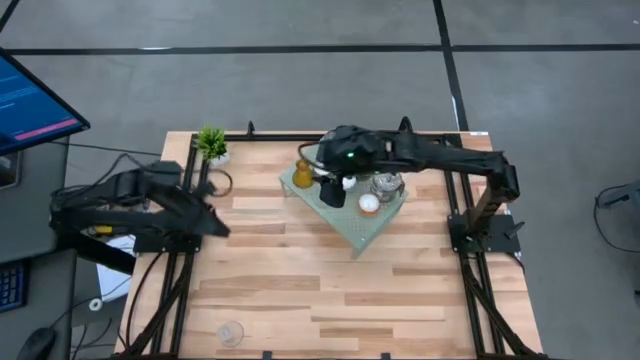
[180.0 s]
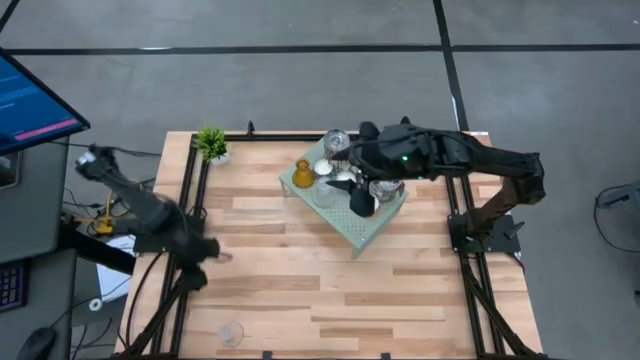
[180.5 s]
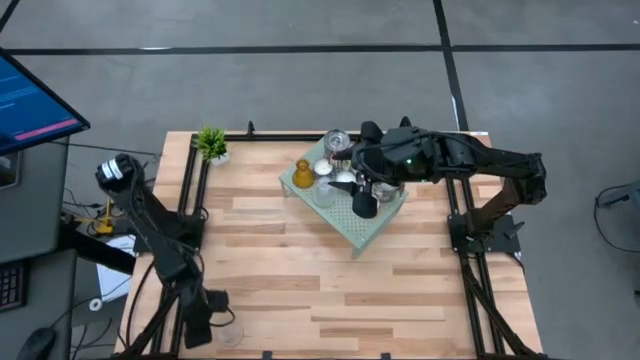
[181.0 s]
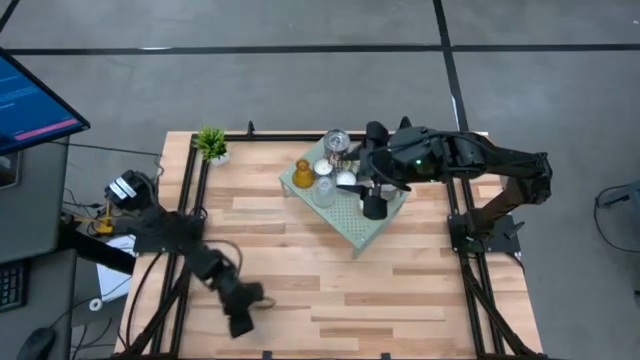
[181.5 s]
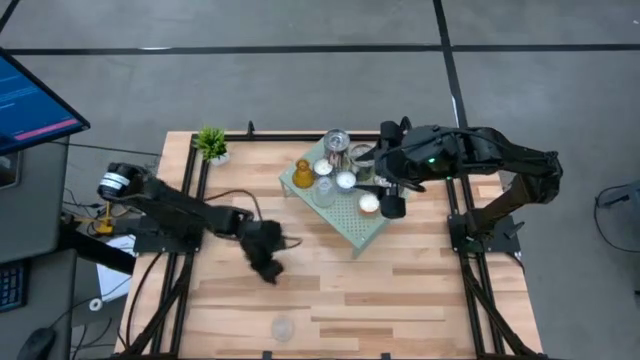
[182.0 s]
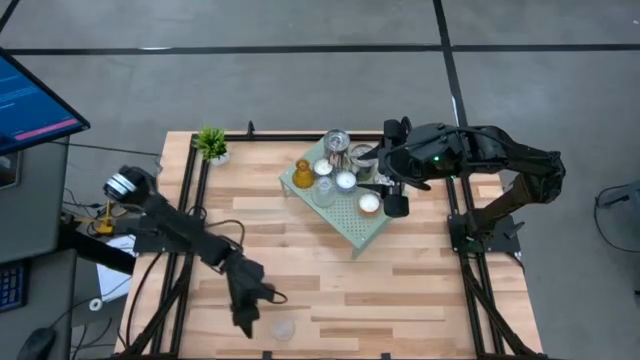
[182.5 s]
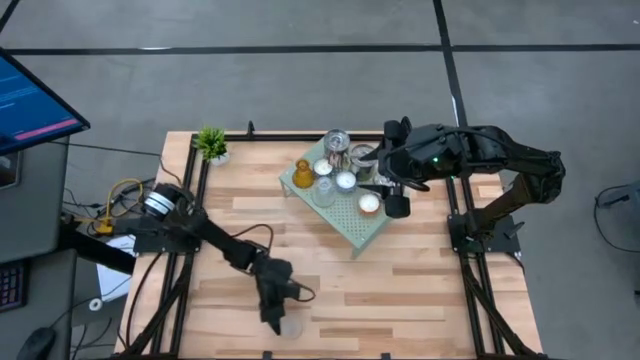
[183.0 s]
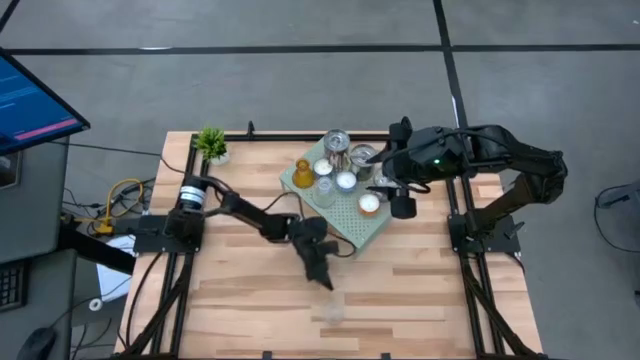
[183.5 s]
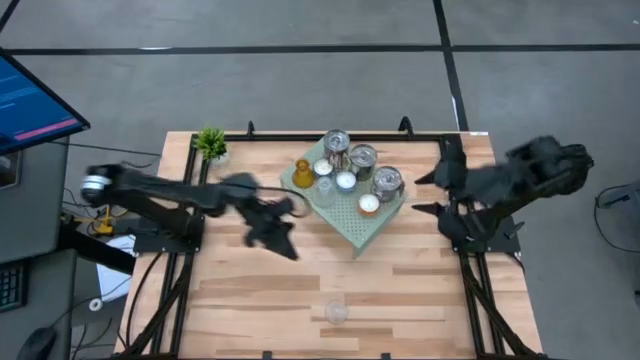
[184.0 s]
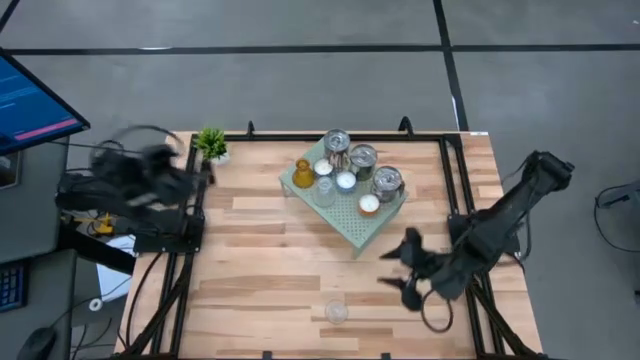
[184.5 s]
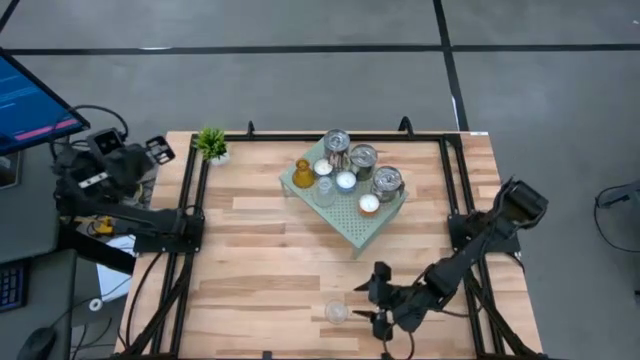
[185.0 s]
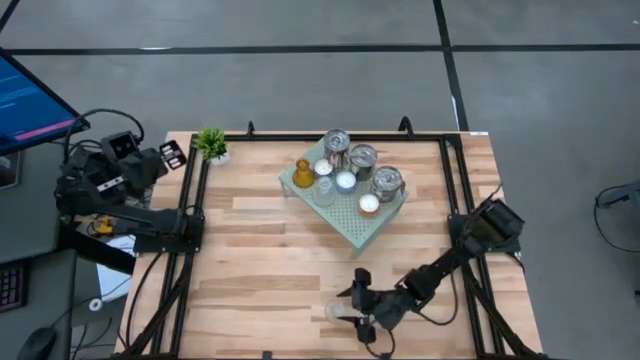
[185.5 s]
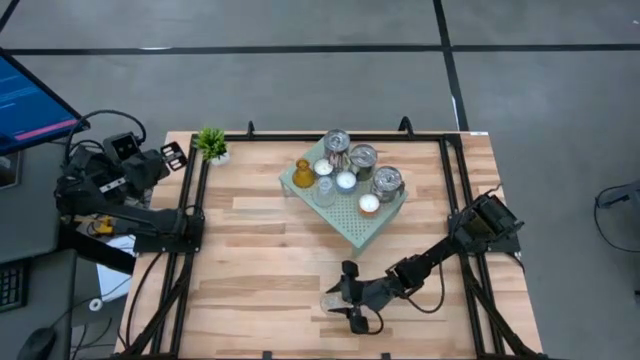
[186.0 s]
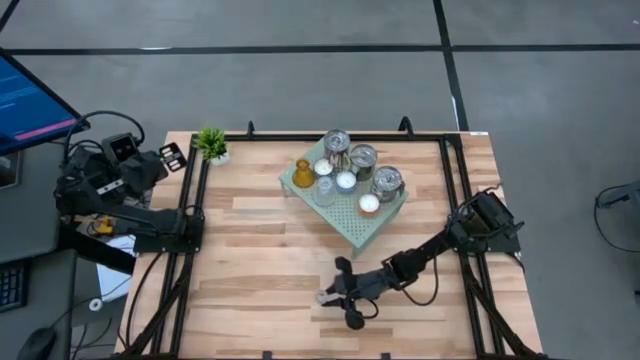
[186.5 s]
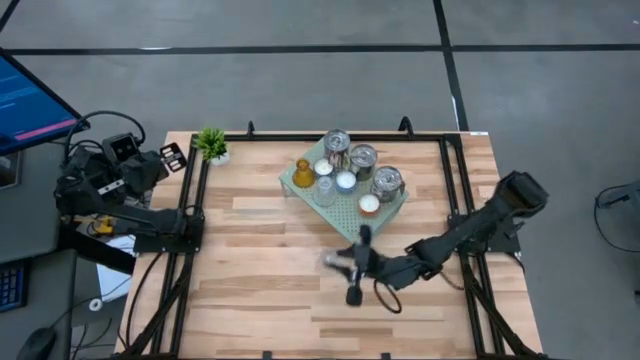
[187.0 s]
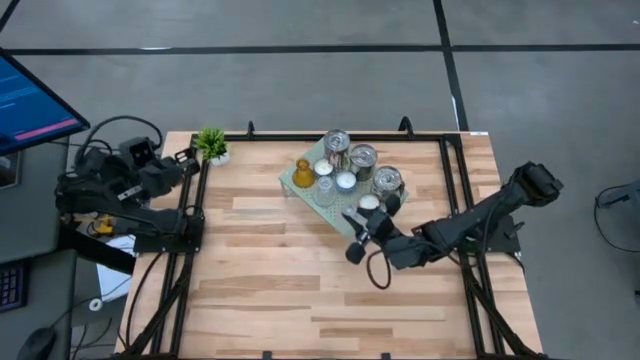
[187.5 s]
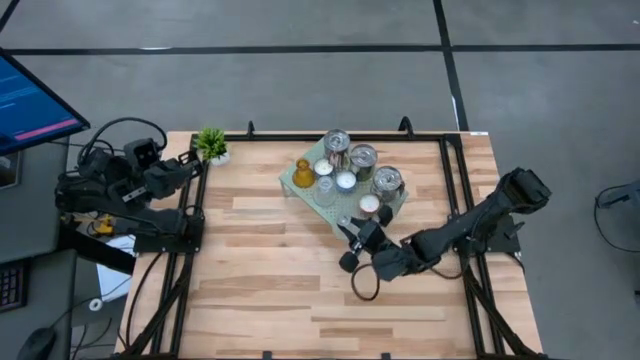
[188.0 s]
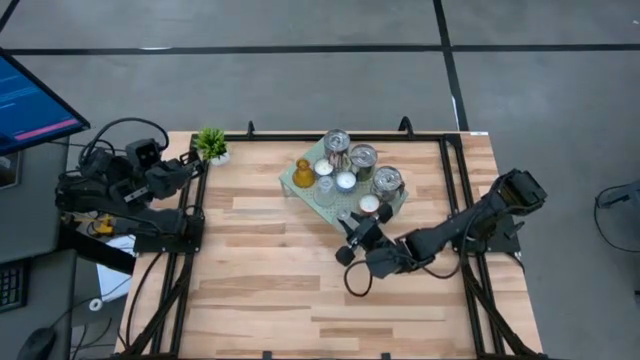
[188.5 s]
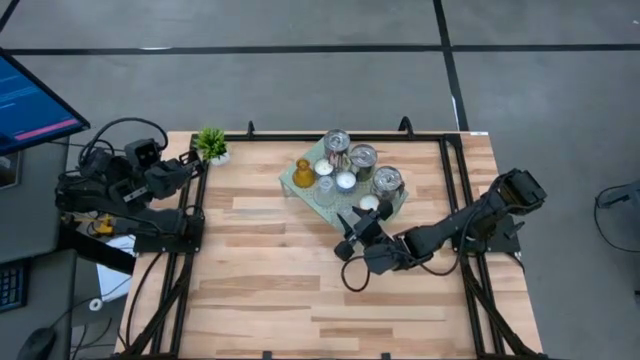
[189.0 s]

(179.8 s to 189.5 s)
Task: Stock candles on shelf
Put the transparent candle holder on the shelf

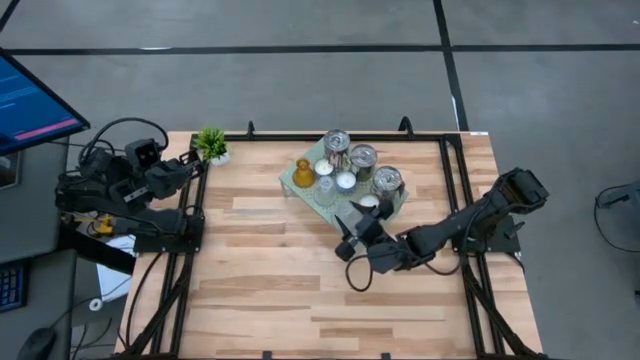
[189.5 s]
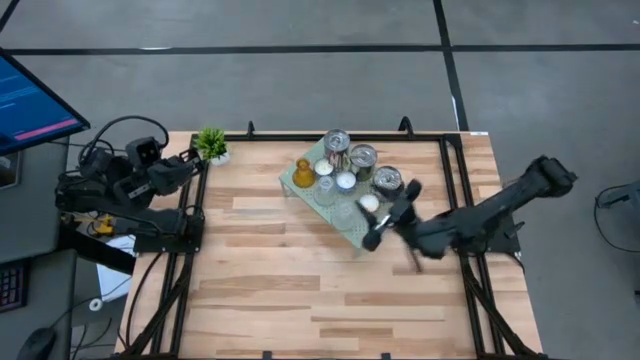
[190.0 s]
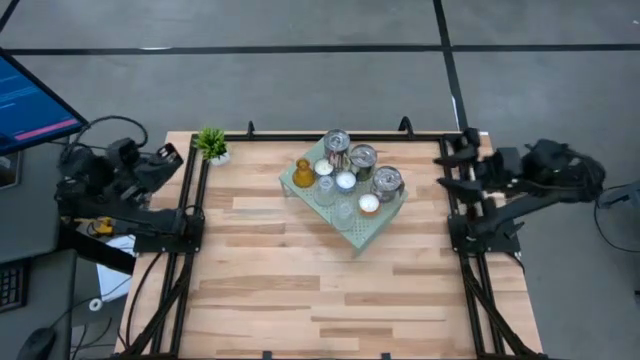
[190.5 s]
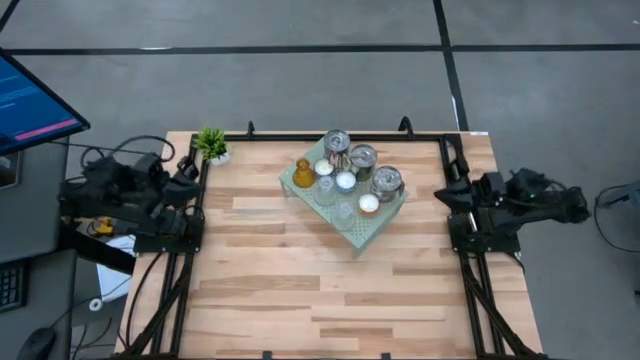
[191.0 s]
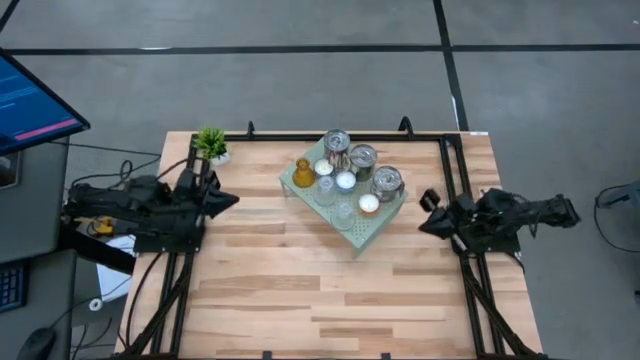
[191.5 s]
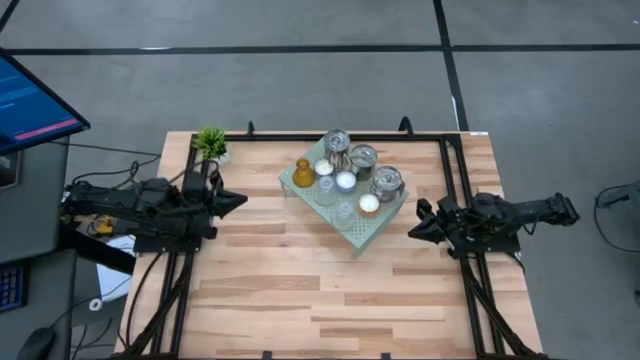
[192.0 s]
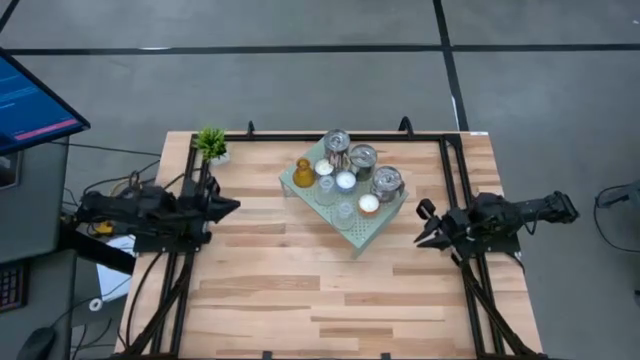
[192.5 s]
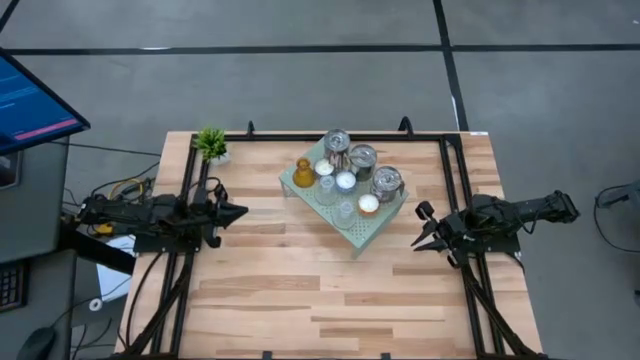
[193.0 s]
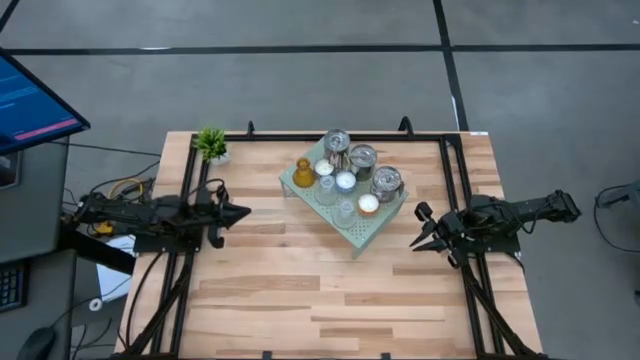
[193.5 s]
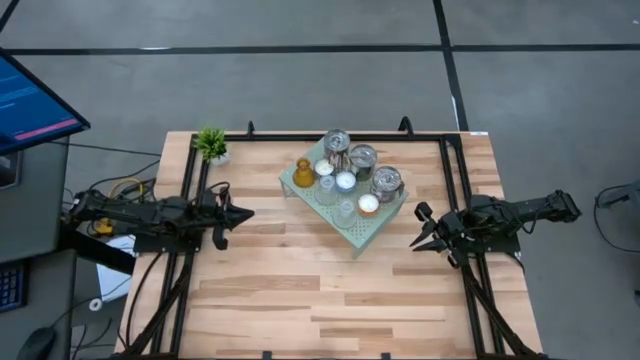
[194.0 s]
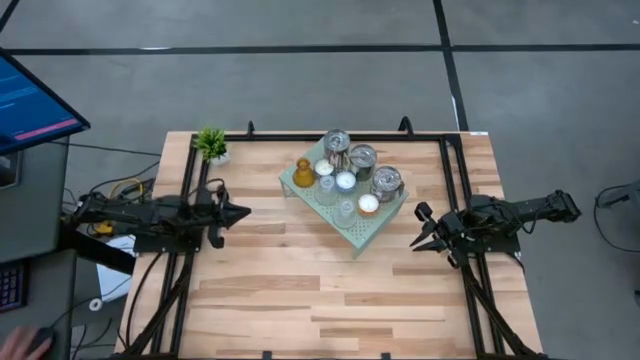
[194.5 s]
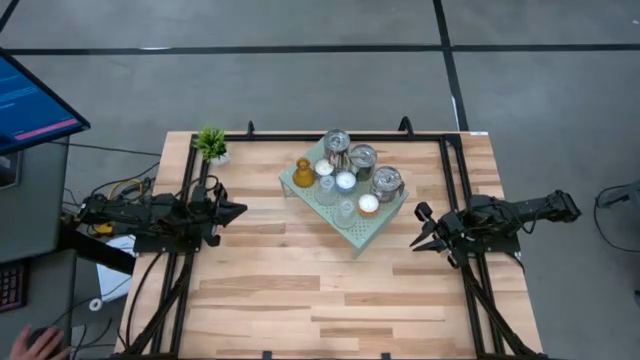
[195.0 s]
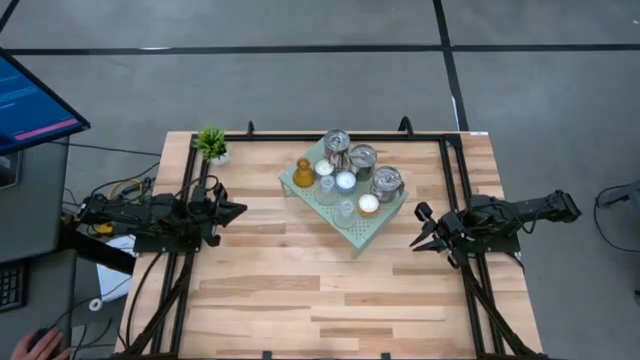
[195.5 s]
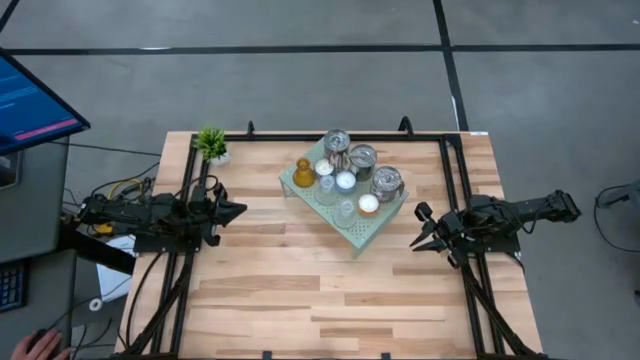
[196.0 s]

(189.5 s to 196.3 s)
Return to Home Position

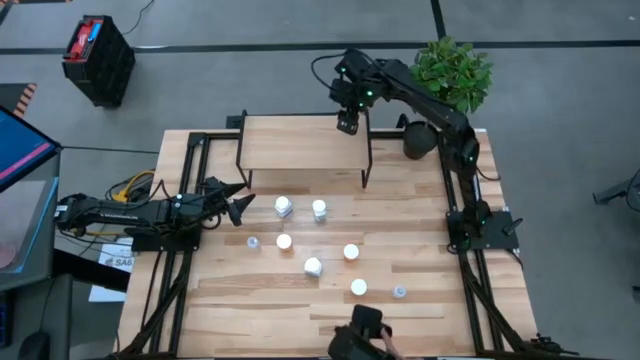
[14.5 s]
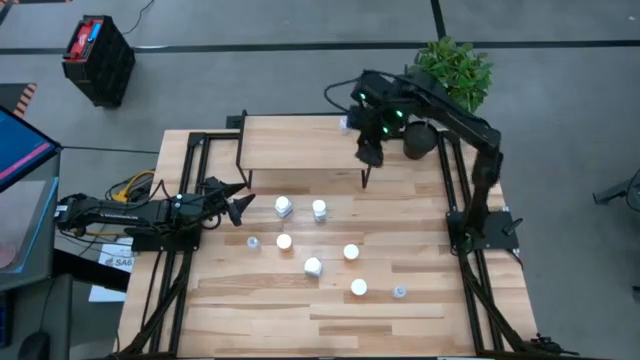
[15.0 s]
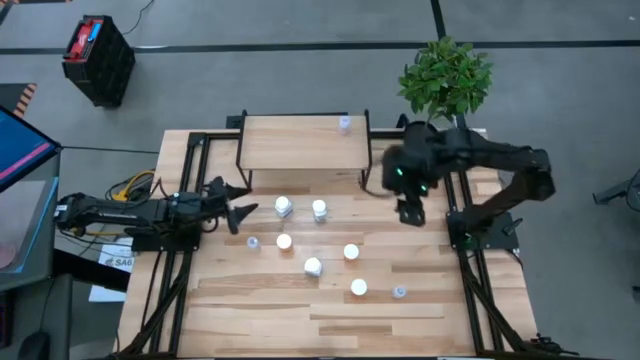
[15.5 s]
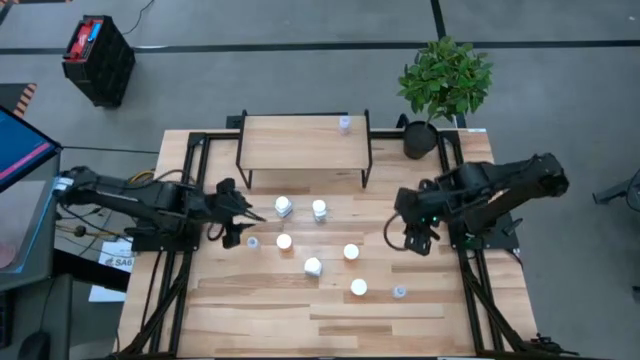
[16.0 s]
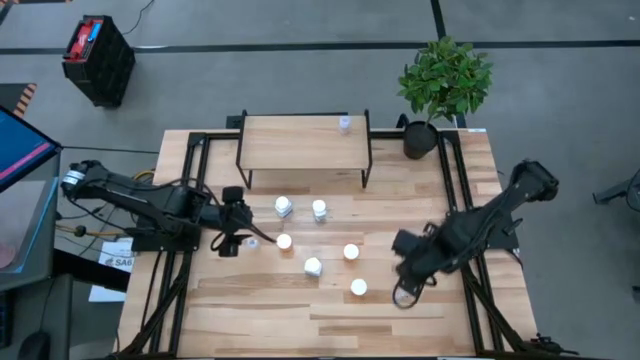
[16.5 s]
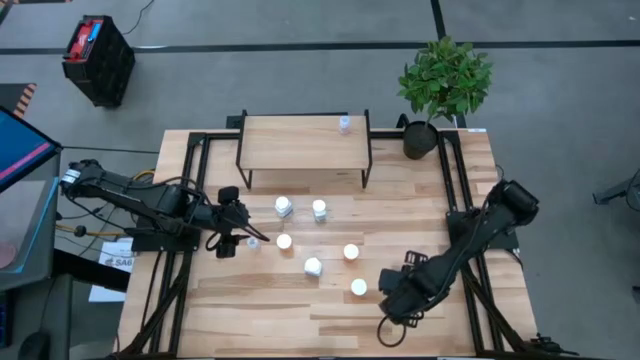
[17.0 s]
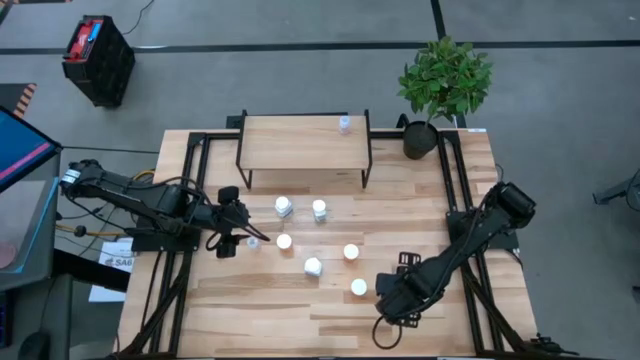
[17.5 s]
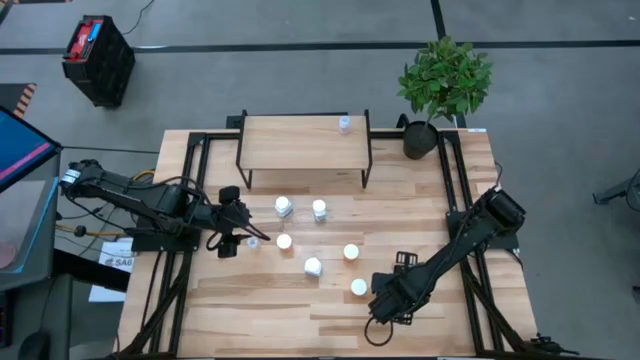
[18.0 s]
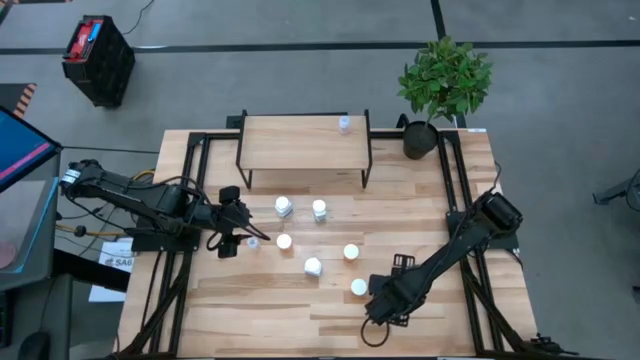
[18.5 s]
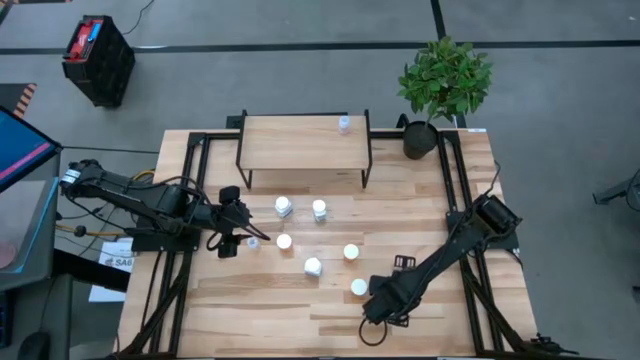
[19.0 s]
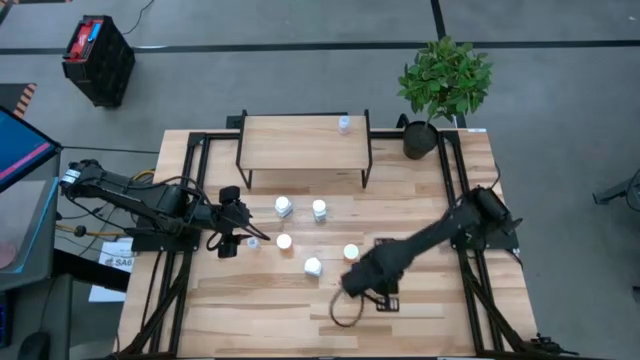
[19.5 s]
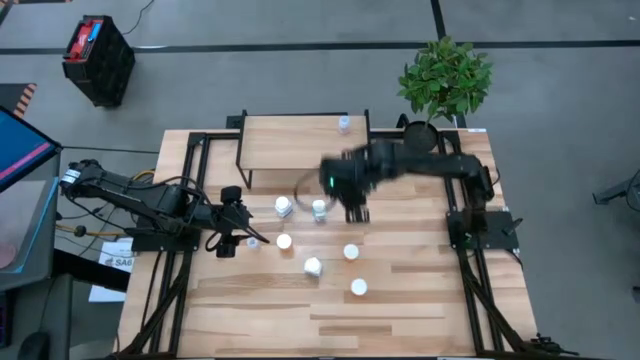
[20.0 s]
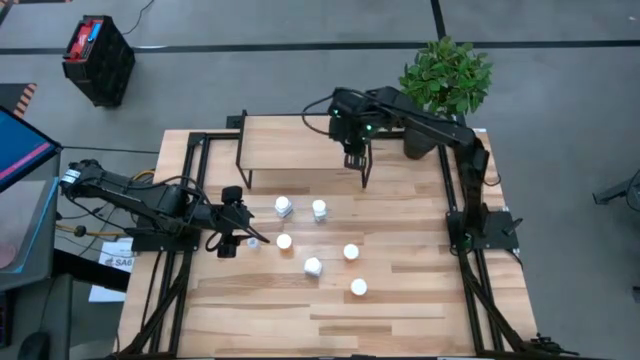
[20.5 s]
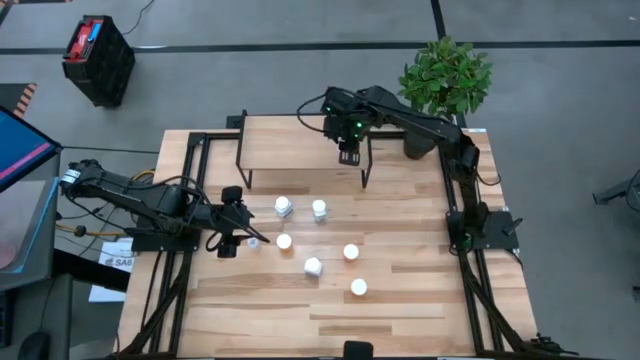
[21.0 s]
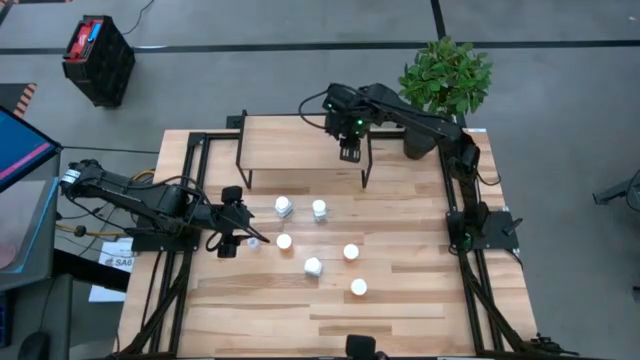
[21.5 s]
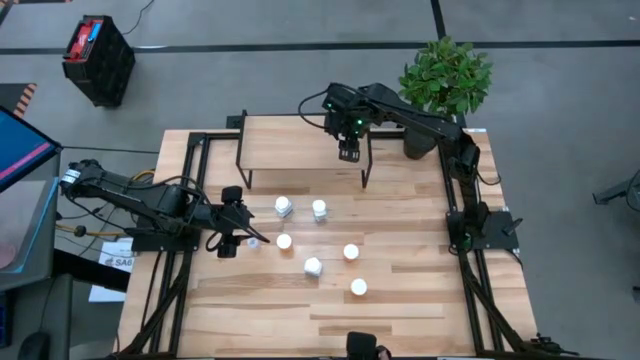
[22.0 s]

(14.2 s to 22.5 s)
Task: Pick and place medicine bottles onto shelf by color
Put the bottom transparent pill bottle on the shelf aligned with the other transparent pill bottle
